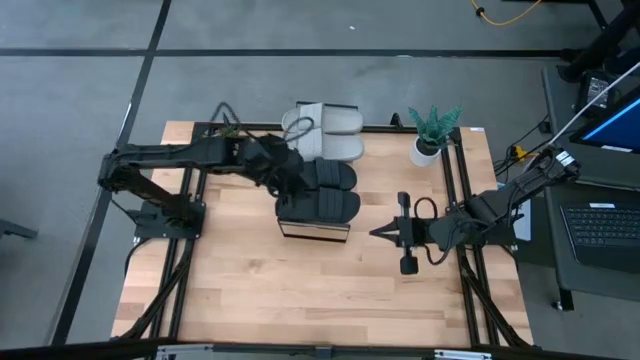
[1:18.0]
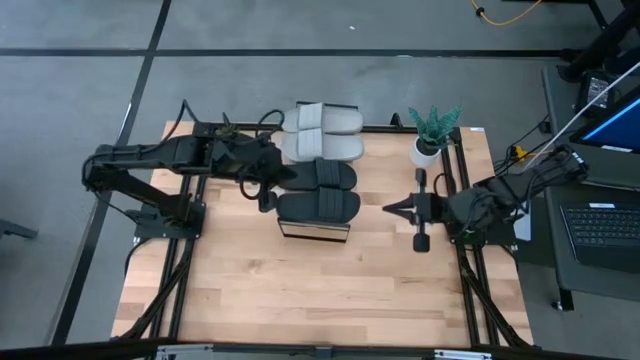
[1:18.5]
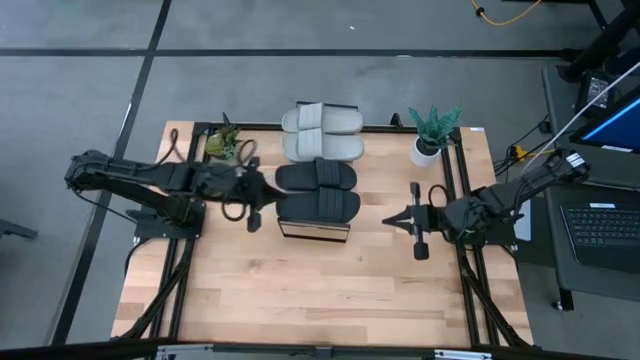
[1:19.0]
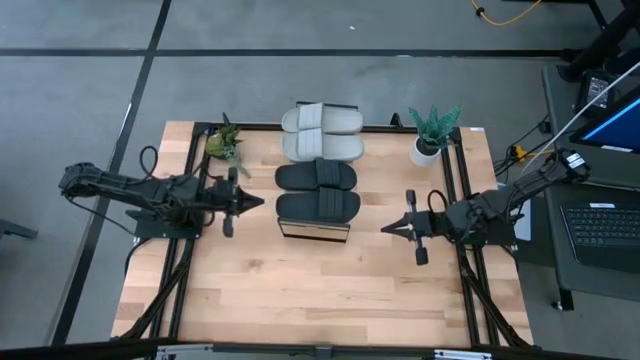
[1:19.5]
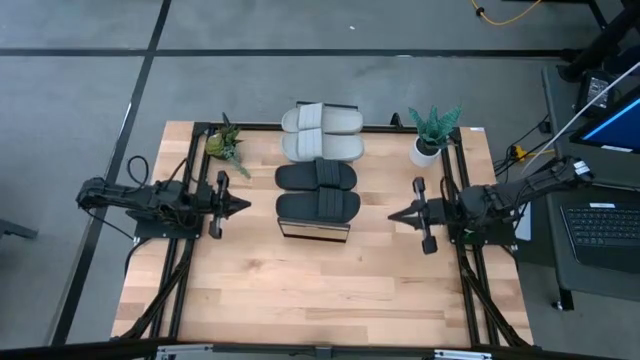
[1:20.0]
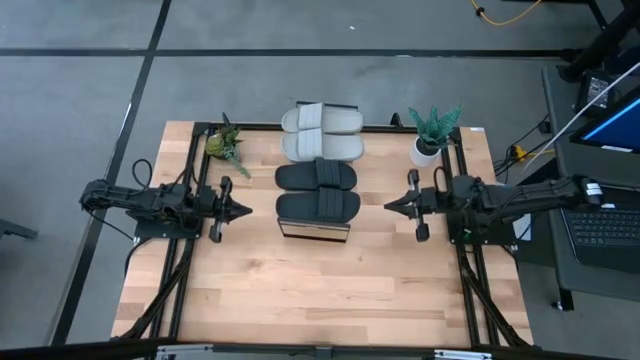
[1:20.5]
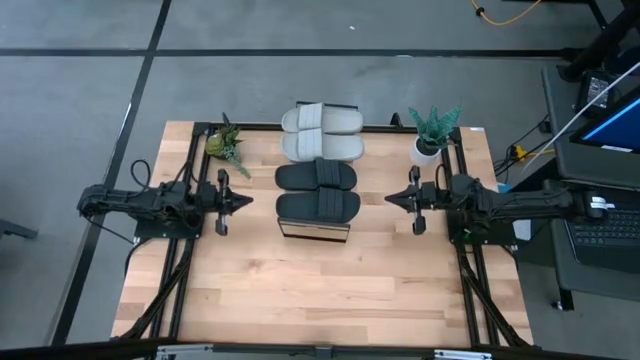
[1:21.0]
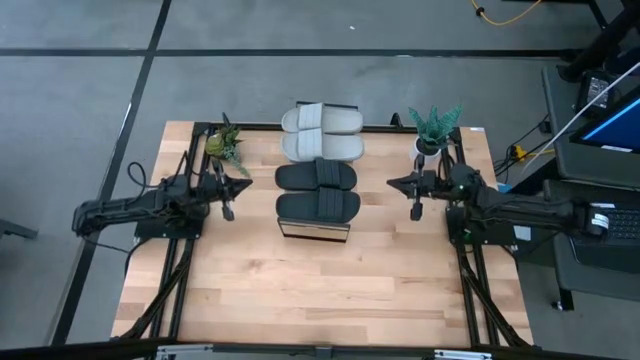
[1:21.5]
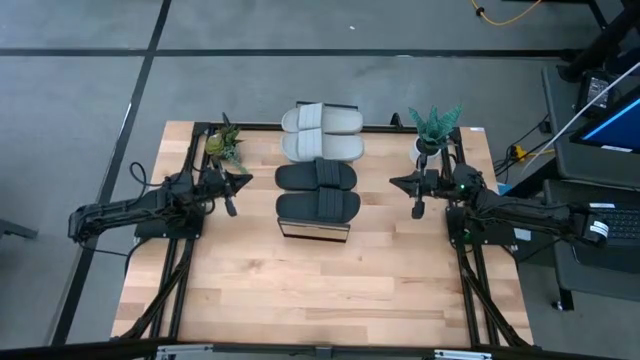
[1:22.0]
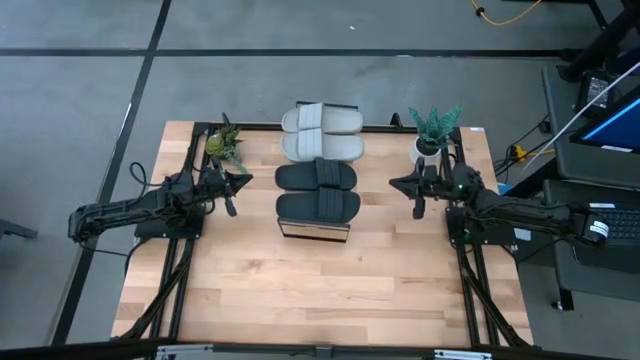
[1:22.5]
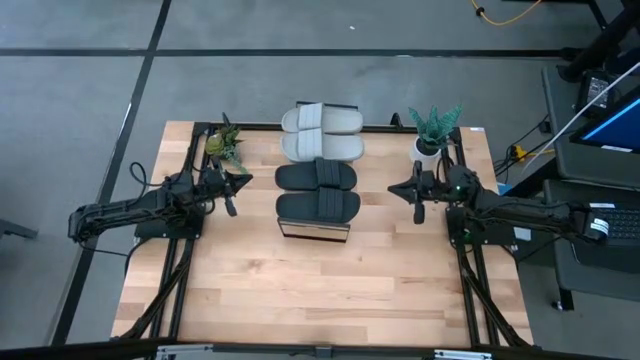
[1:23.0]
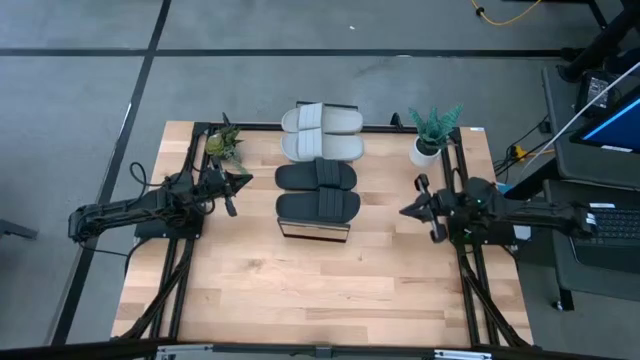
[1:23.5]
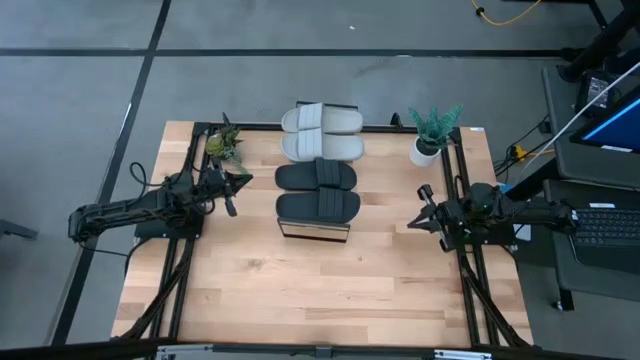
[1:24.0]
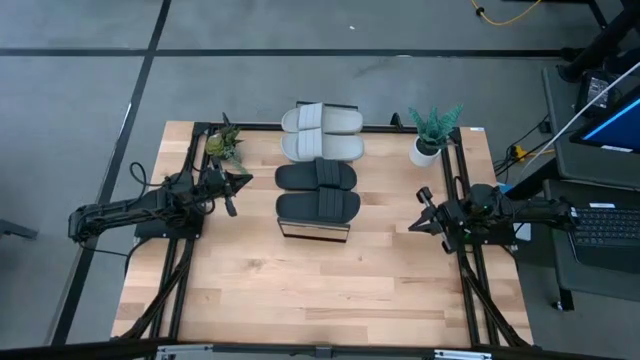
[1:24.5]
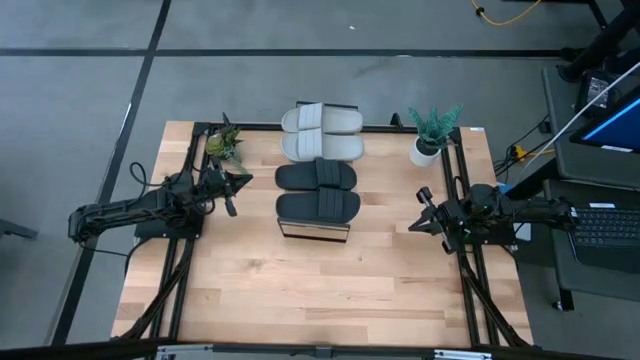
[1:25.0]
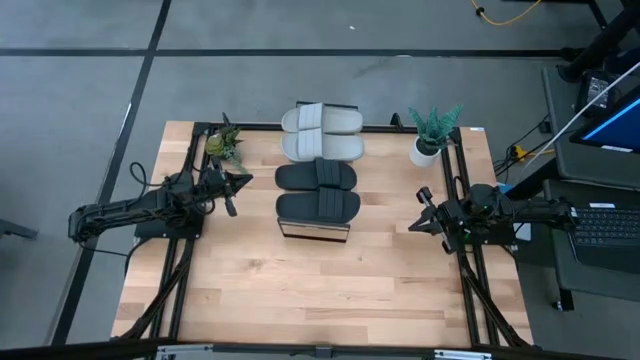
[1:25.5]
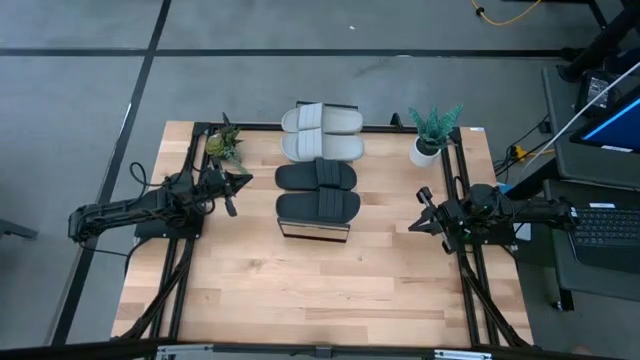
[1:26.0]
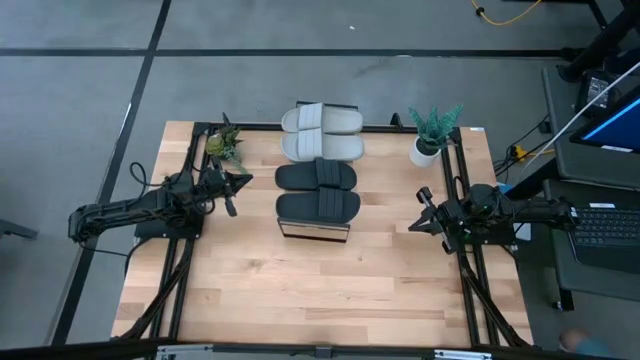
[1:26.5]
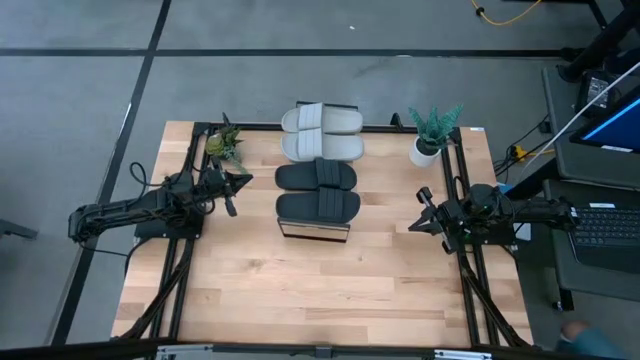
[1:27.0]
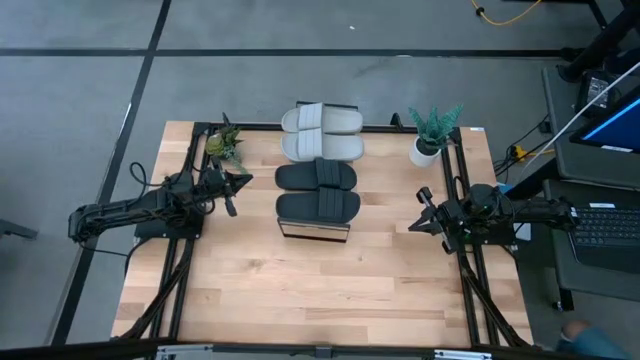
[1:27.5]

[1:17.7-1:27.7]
Task: Pick and place slides into the shelf
Return to Home Position

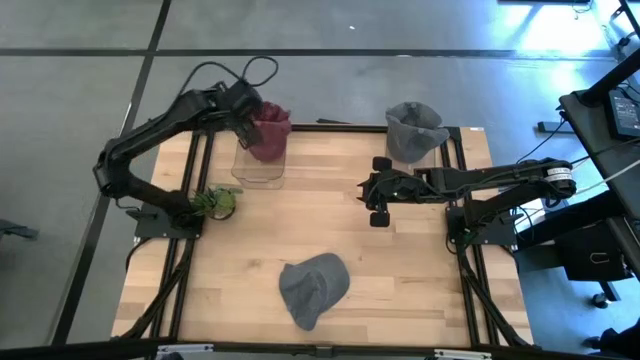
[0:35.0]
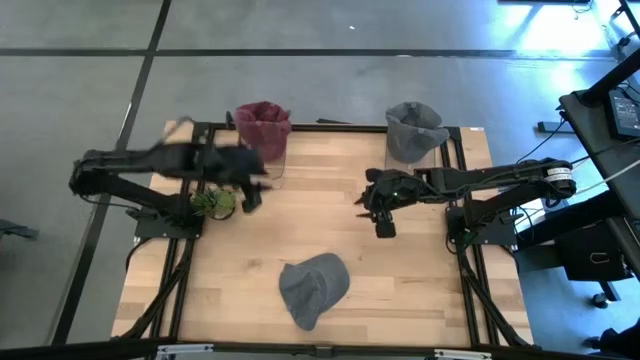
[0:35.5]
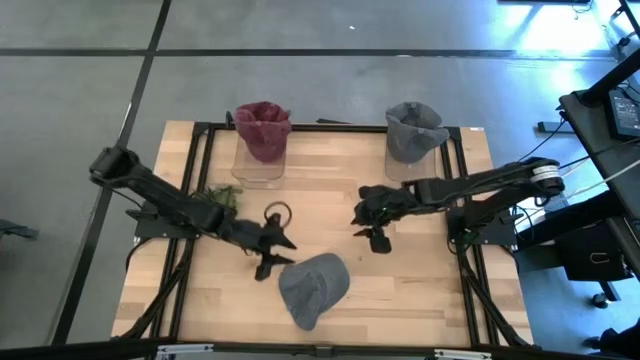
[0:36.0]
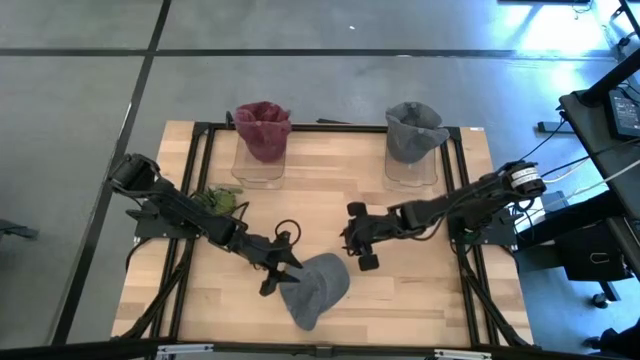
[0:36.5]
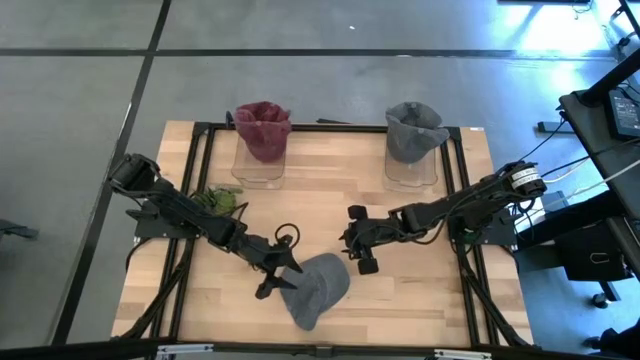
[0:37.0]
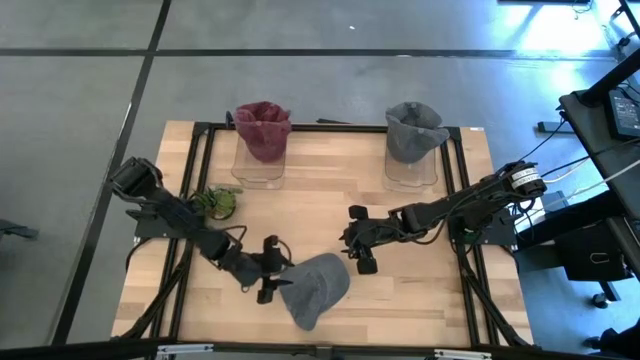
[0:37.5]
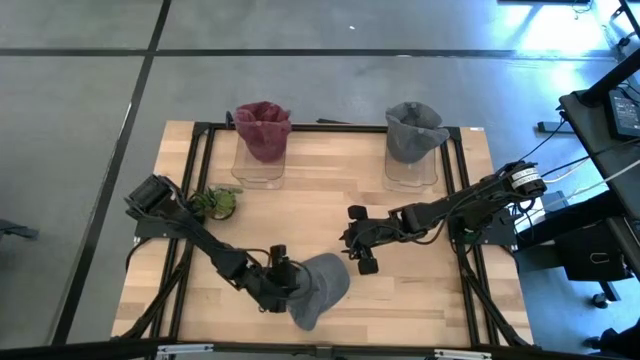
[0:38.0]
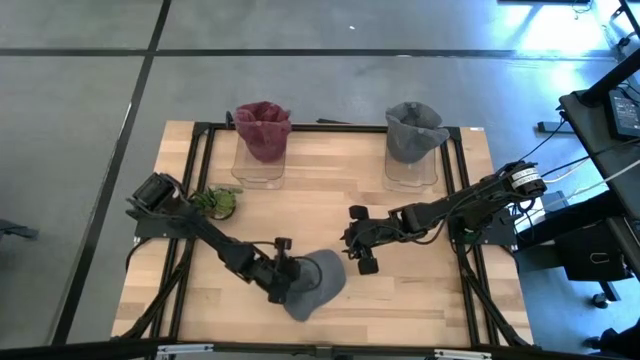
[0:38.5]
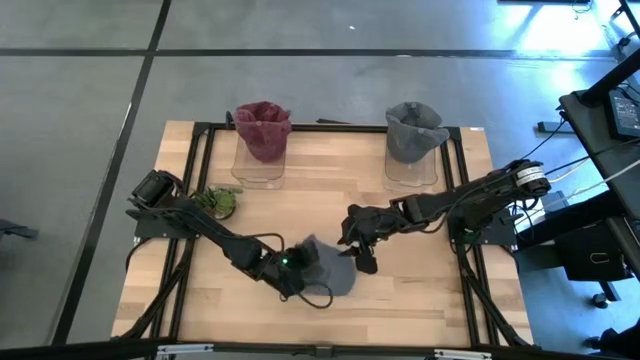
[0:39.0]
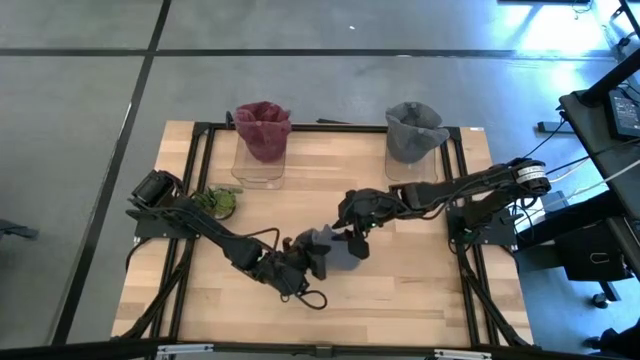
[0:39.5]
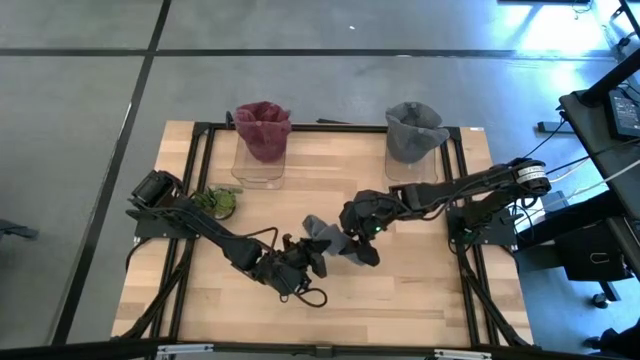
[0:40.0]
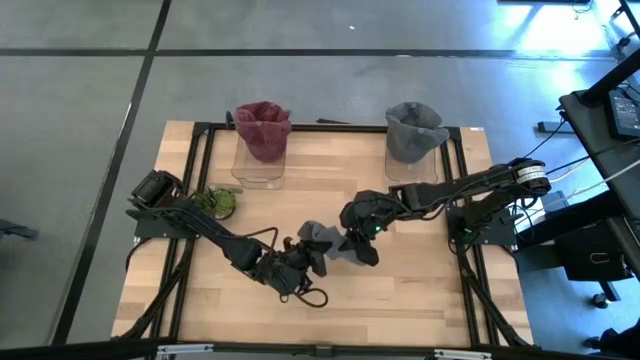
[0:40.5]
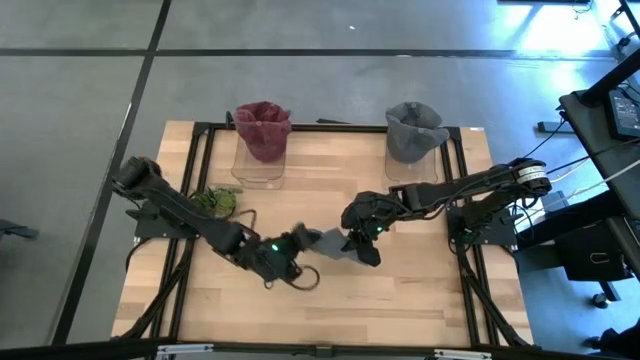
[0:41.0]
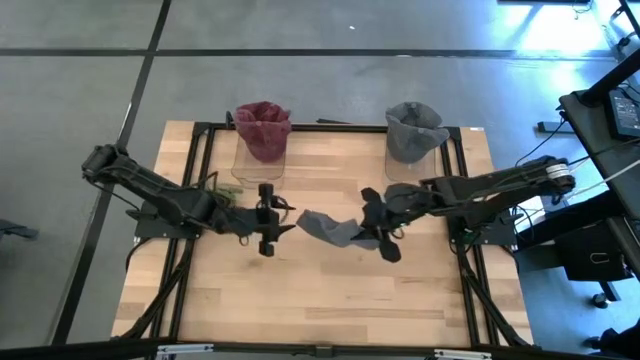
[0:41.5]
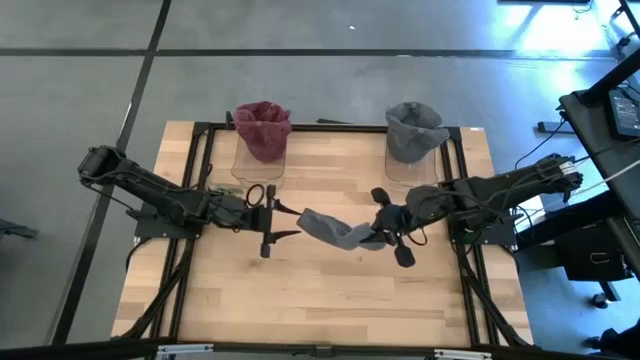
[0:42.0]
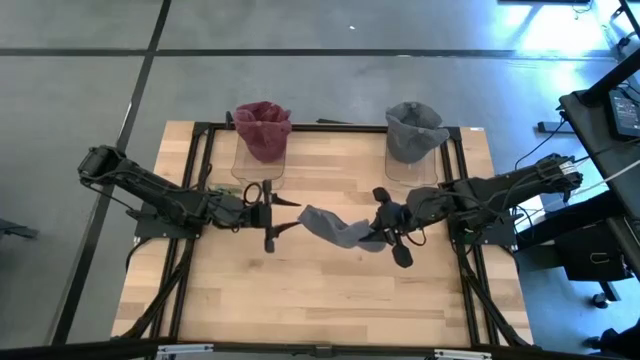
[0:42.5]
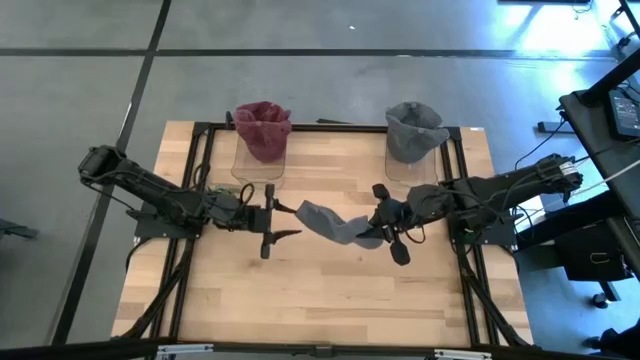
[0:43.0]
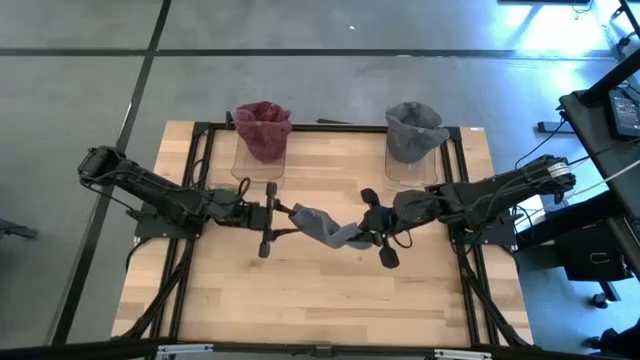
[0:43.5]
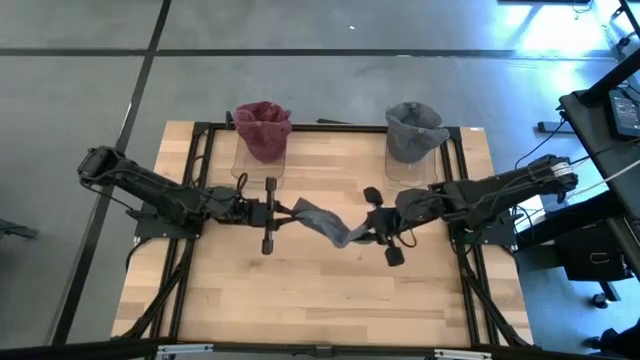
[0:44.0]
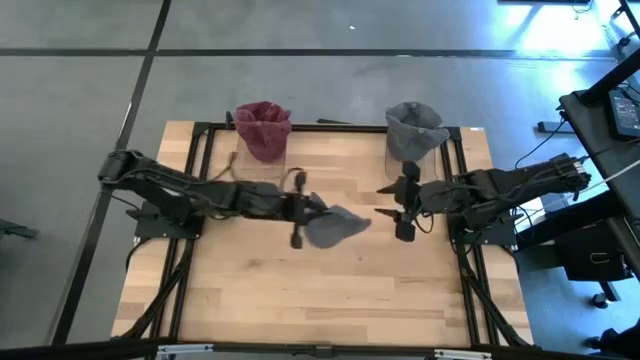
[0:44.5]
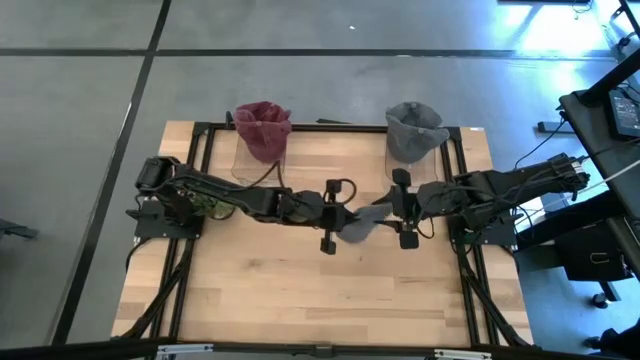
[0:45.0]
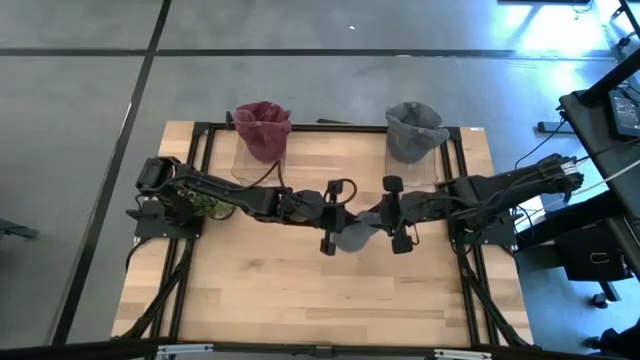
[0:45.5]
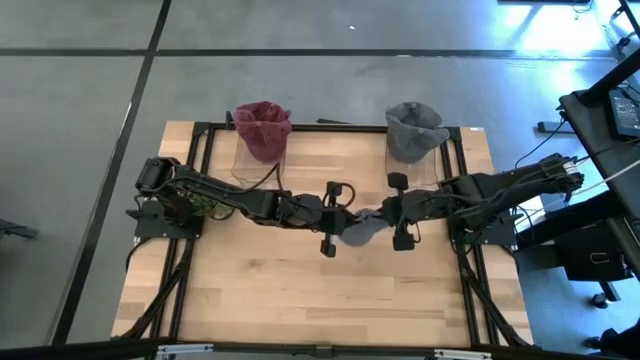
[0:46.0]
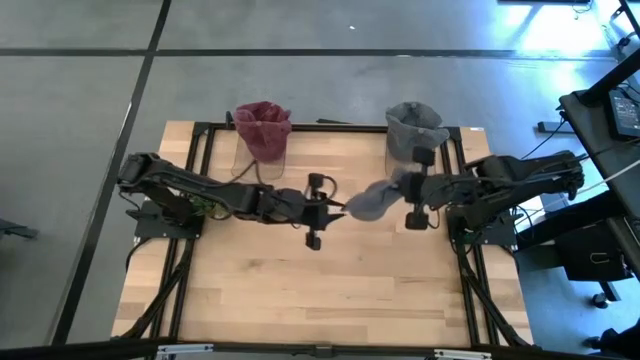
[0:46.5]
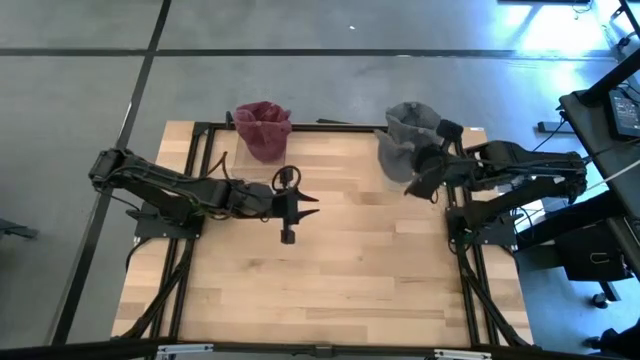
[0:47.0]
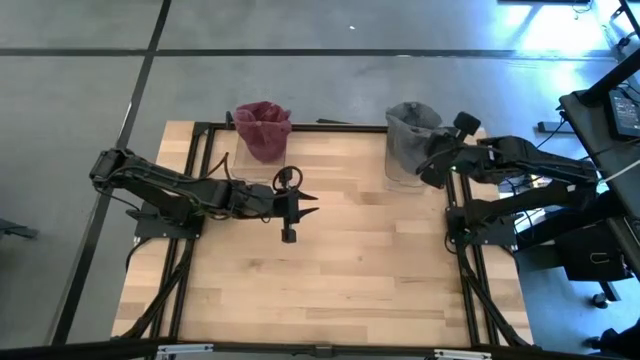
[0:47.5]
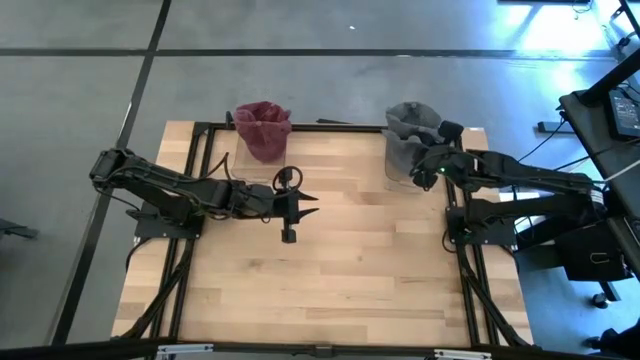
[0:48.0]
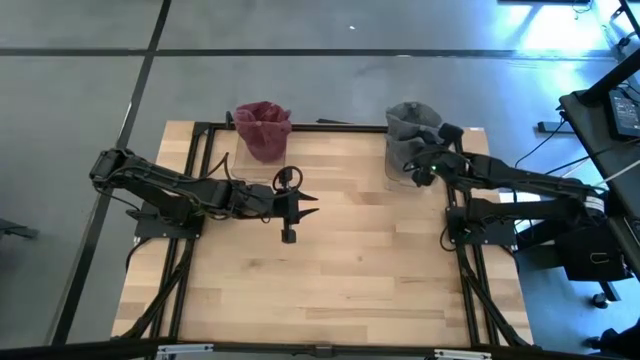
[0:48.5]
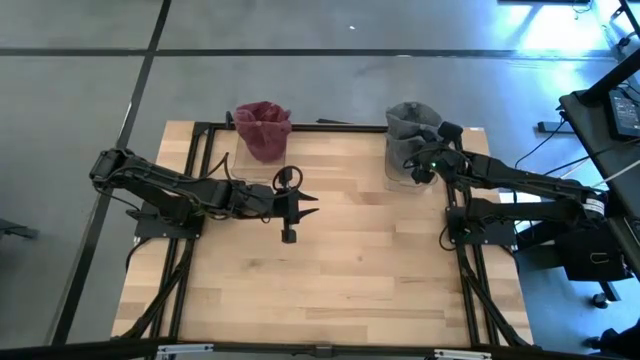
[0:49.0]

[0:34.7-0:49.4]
Task: Pick & Place hat
Put the gray cap into the right transparent bin
